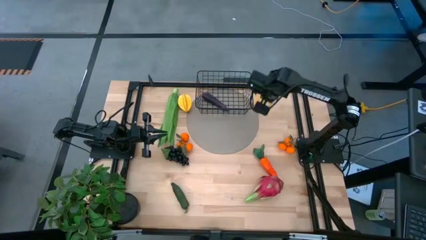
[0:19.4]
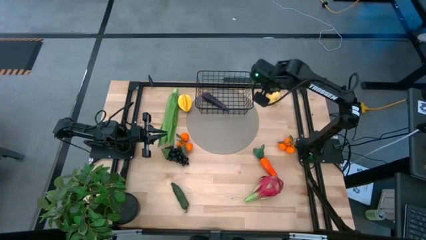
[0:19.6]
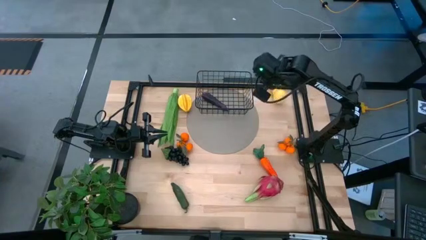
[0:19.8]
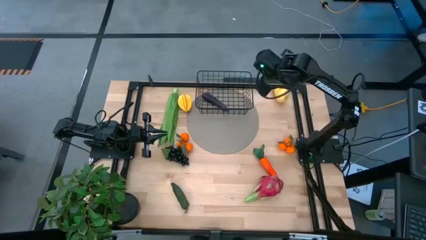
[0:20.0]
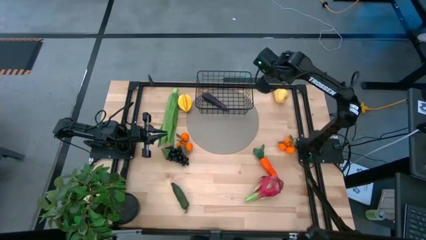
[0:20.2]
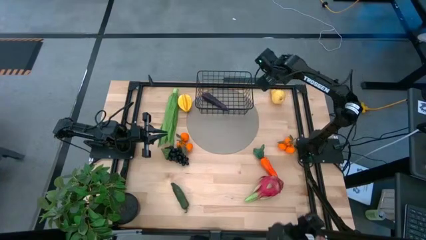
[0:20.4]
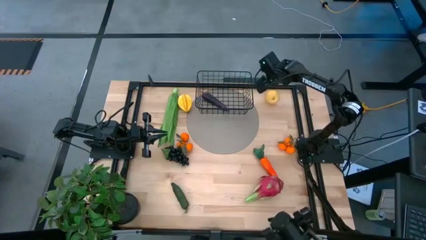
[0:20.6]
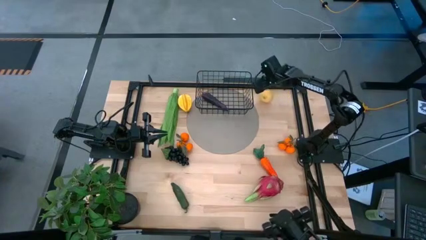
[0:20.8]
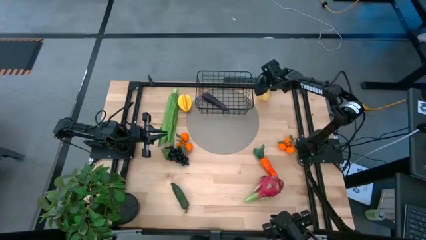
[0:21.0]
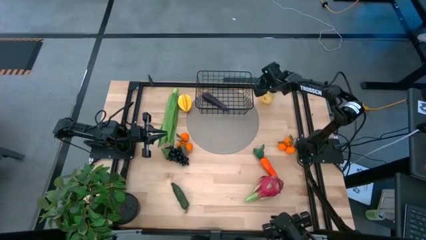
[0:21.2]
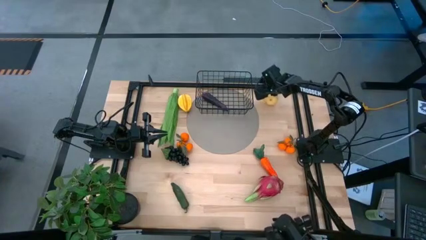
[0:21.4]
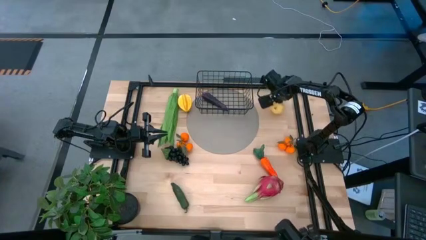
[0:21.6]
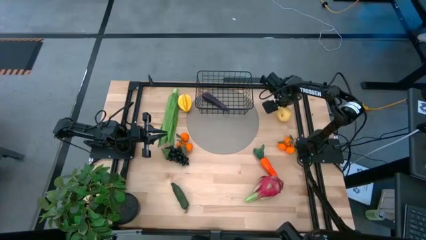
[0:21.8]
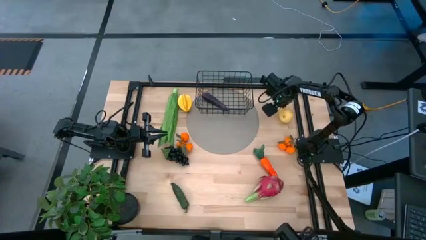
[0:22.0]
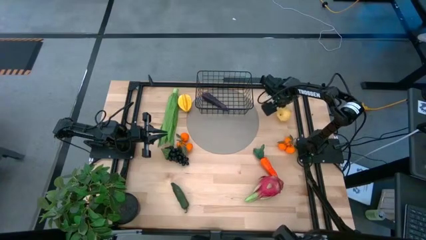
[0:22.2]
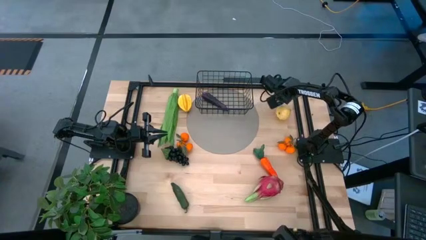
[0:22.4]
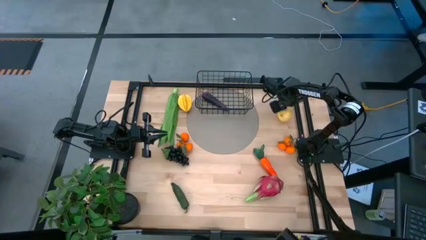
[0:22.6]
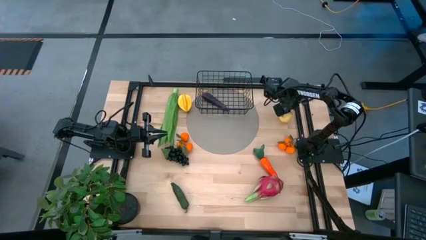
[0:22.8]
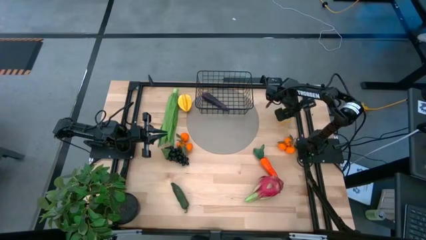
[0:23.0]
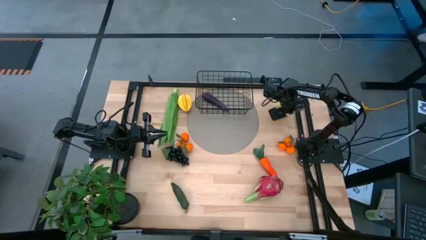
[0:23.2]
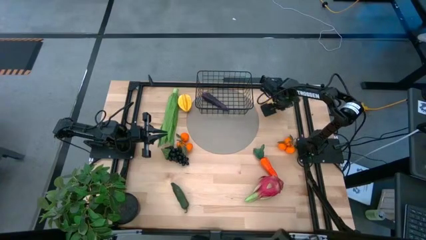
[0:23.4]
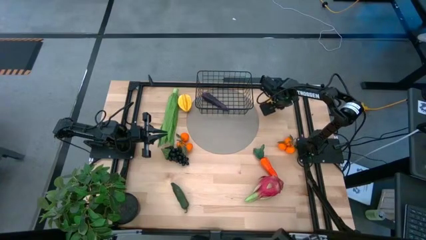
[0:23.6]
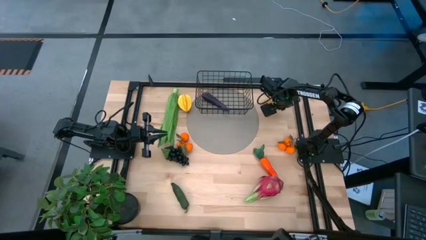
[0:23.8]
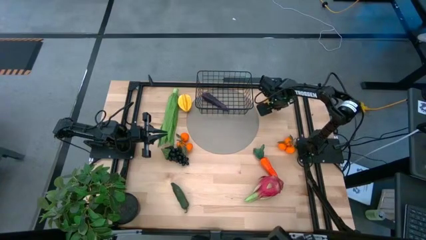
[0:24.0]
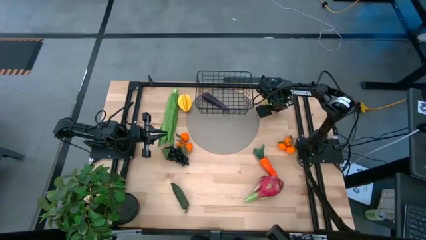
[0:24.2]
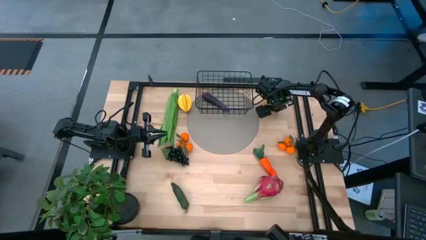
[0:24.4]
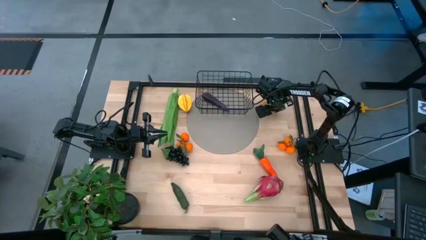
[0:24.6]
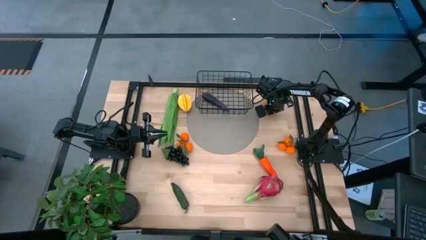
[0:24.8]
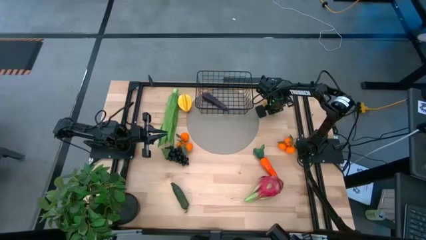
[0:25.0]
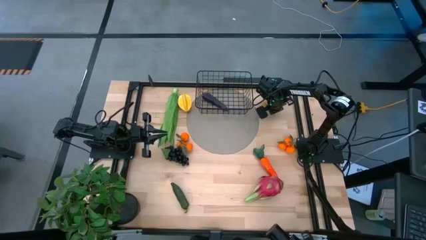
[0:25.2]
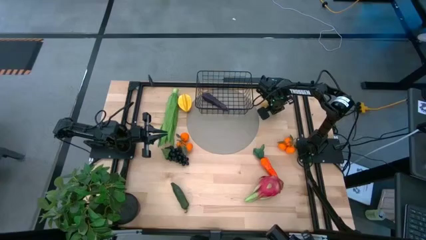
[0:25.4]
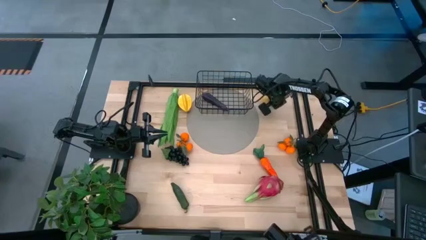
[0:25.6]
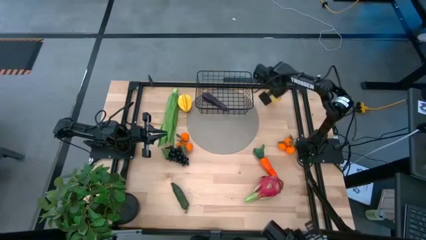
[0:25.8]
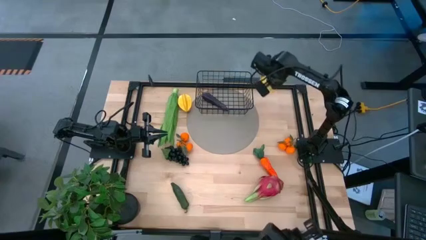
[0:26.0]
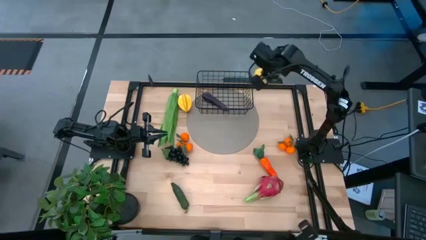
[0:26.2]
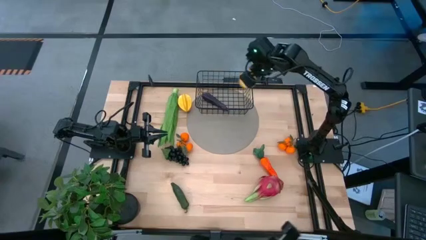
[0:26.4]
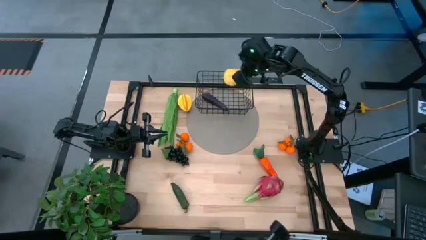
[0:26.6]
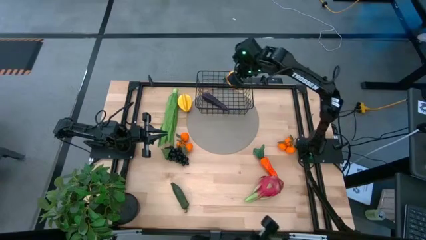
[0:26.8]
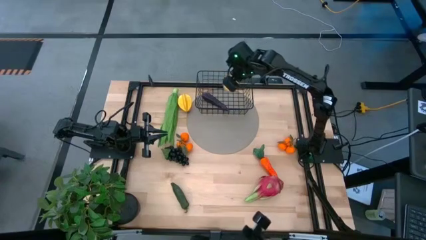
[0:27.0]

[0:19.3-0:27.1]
Task: Build produce basket
Put the yellow pear into the black wire basket

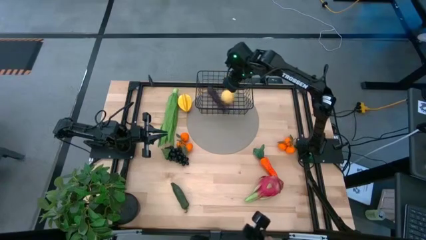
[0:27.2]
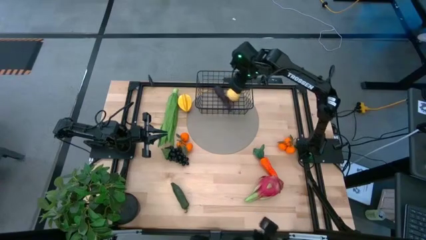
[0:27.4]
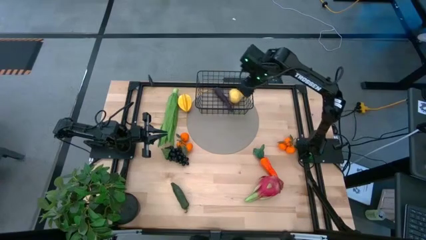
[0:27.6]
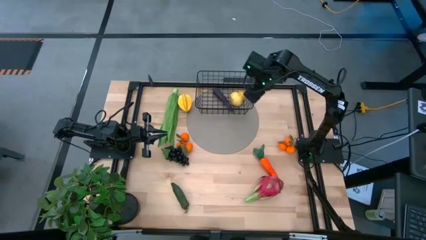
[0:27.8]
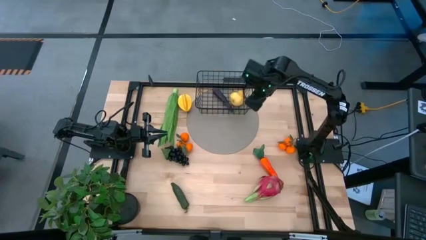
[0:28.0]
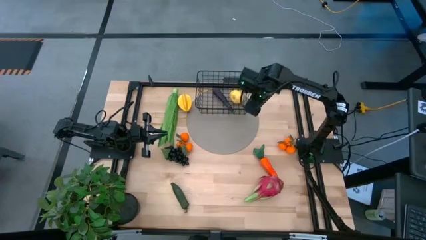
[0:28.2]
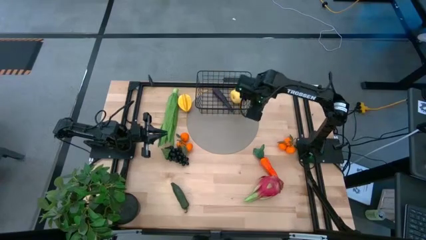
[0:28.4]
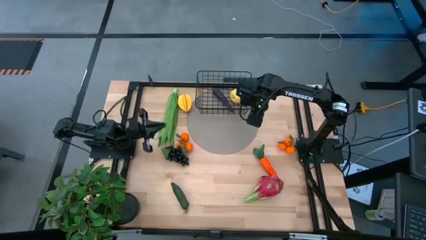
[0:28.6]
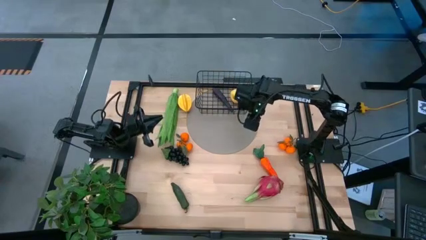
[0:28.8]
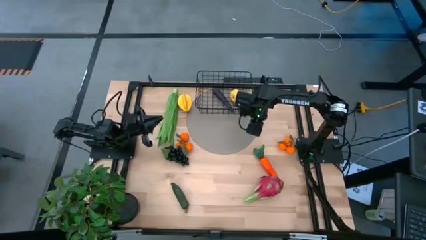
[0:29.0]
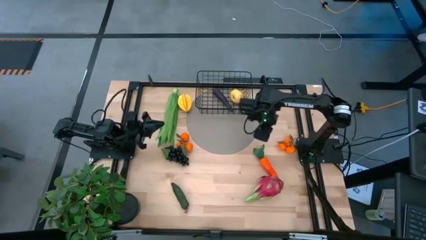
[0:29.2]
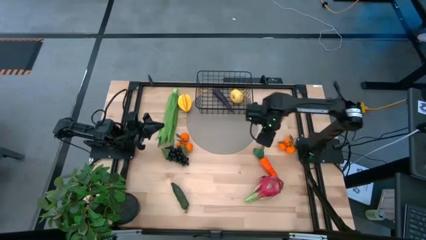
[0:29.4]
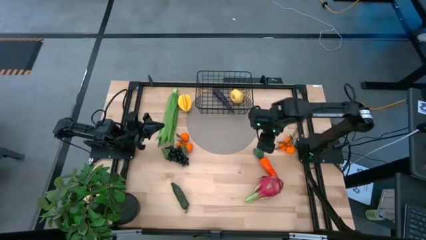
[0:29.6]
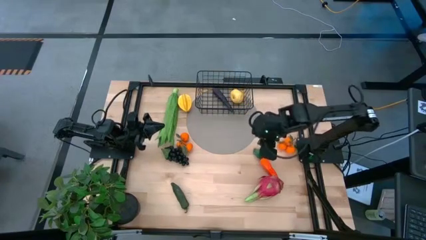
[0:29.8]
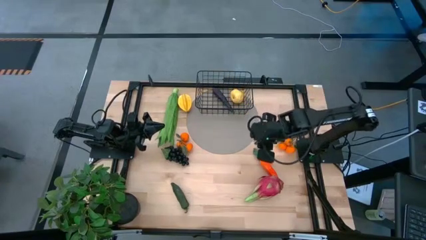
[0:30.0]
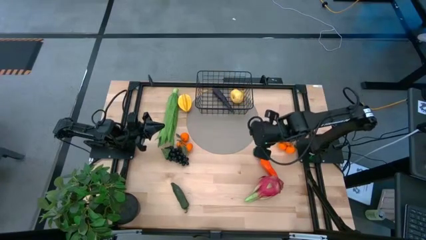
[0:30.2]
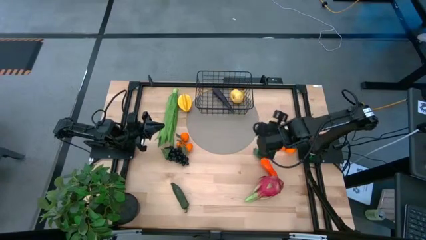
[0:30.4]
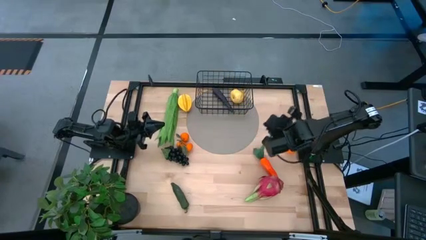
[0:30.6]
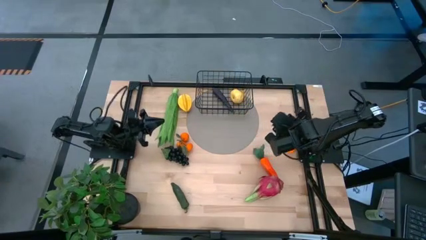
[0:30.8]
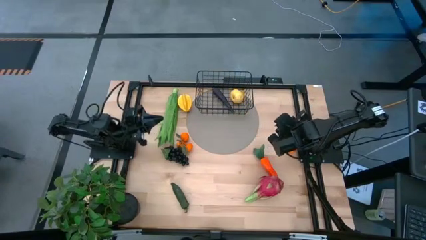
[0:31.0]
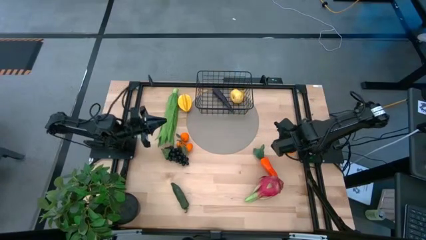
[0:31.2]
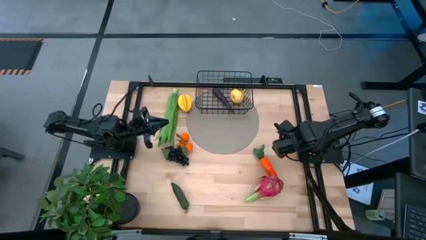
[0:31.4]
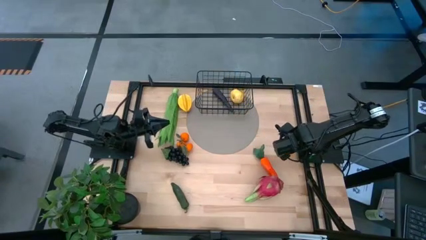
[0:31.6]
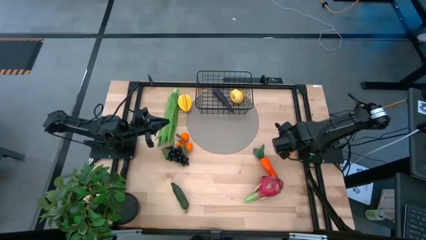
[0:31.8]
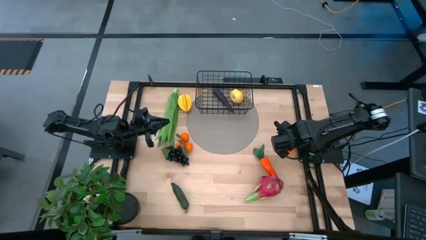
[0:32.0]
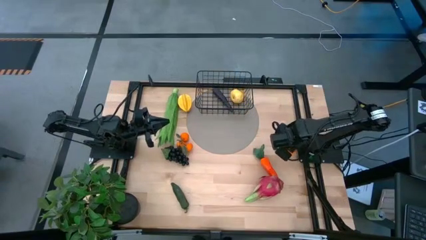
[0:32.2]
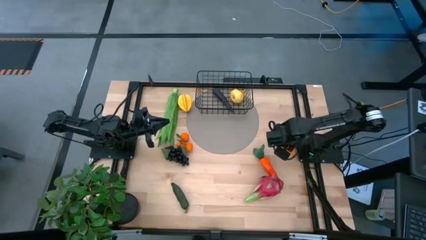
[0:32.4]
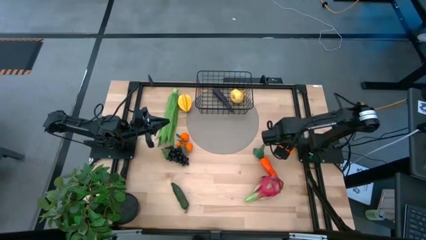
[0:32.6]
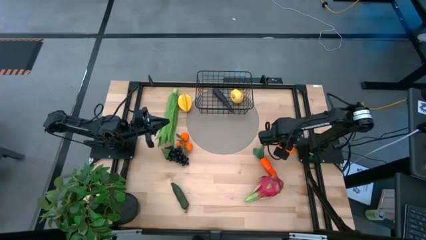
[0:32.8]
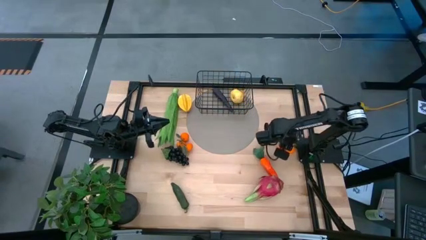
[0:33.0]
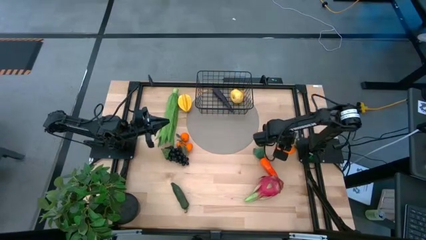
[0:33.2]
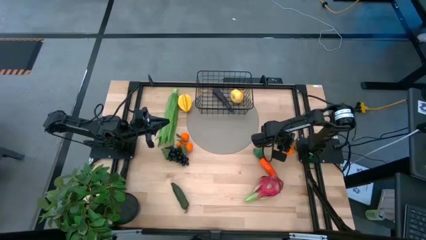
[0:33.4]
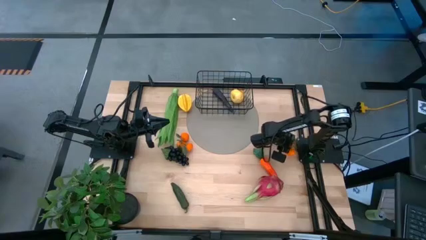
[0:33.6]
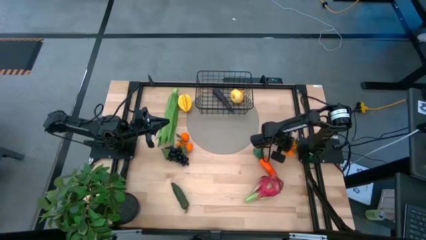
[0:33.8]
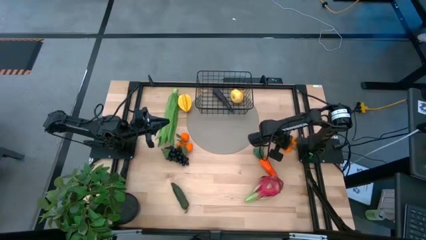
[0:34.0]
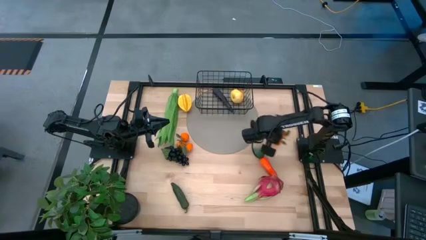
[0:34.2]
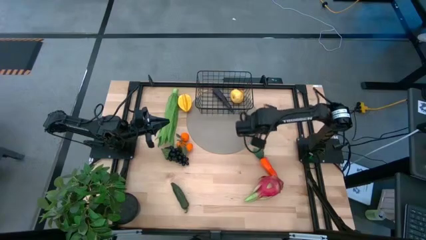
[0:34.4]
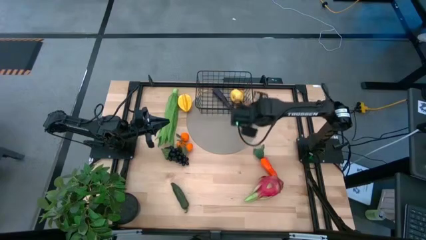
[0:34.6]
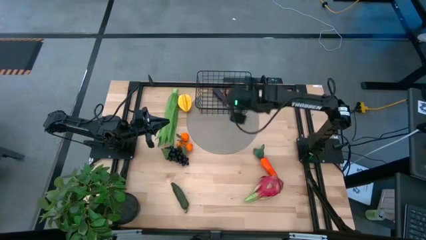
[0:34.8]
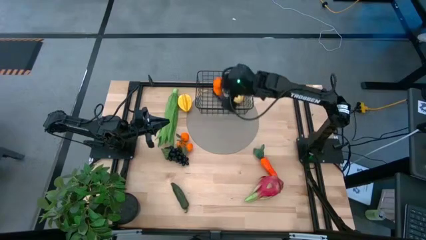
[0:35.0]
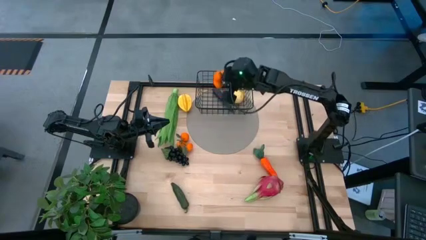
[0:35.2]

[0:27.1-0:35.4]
Put the right orange tangerines into the black wire basket

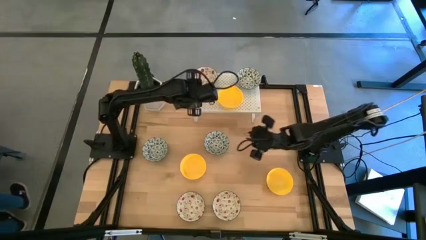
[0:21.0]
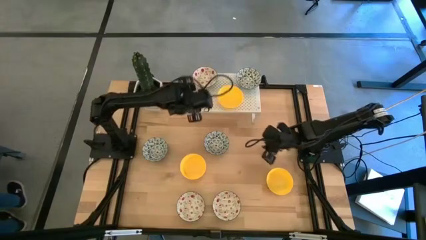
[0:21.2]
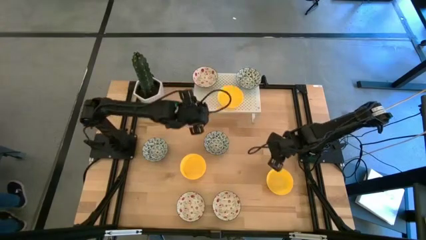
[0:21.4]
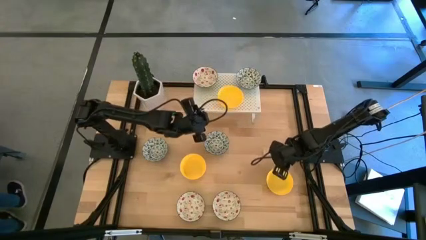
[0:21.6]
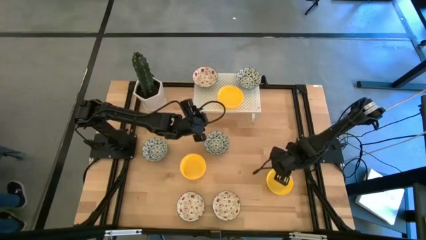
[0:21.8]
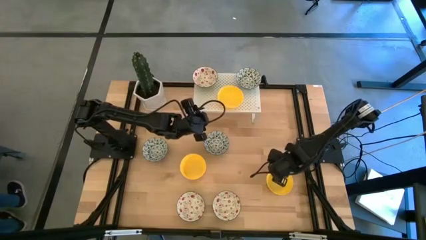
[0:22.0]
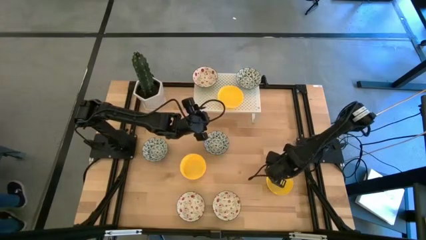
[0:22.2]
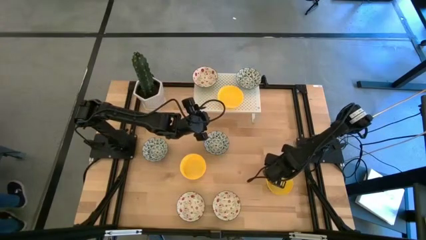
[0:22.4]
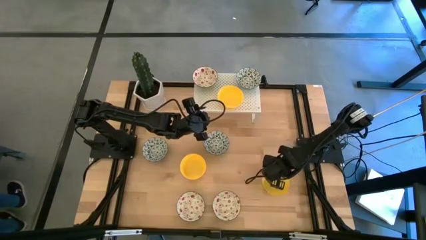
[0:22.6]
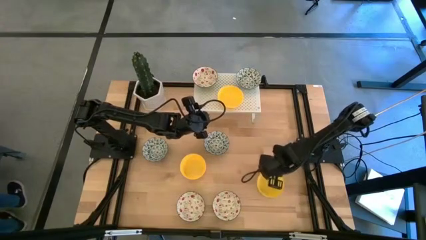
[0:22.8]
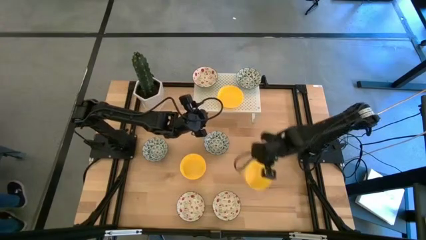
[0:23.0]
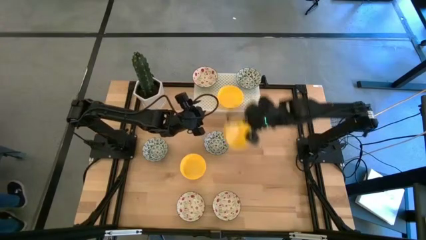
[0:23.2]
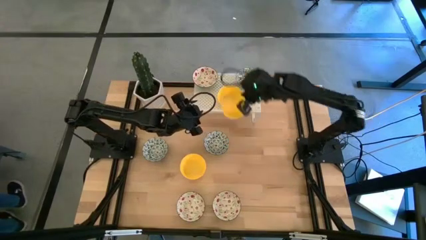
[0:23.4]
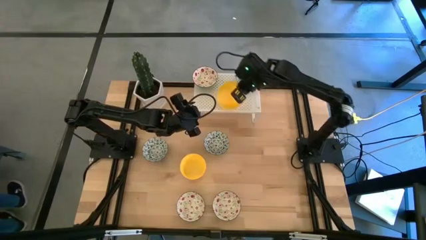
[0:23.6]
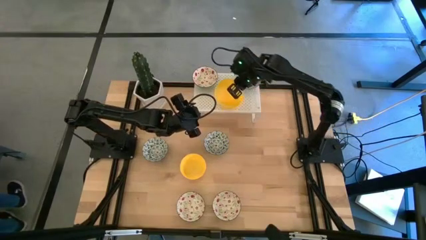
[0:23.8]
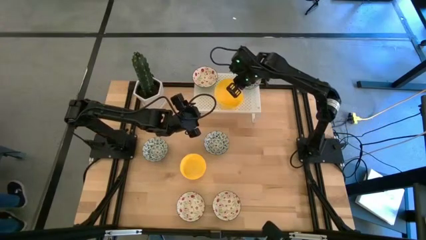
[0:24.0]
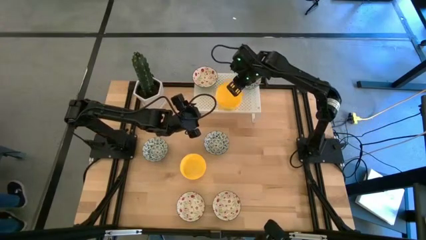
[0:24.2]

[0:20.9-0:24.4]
Task: Pick & Place Mini bowls
Stack the right yellow bowl on top of the other yellow bowl on the shelf
